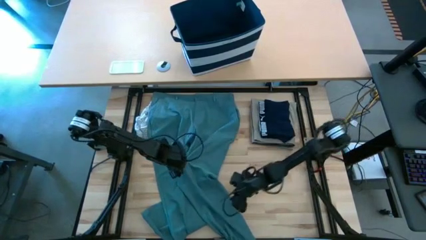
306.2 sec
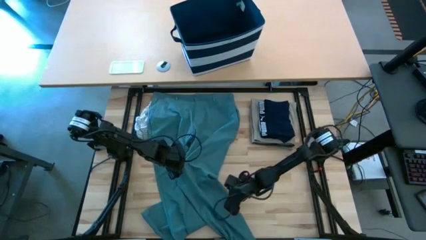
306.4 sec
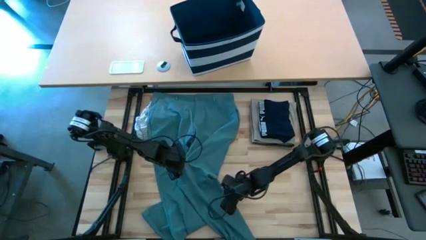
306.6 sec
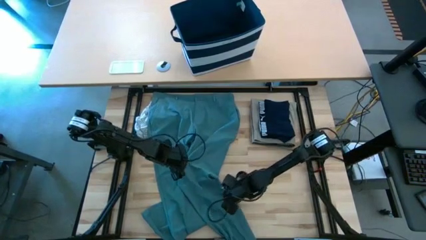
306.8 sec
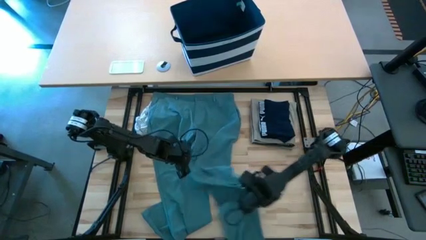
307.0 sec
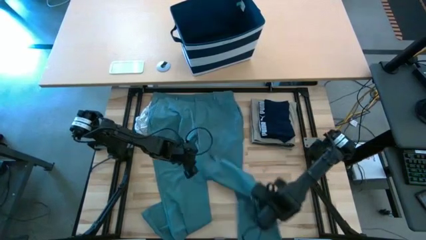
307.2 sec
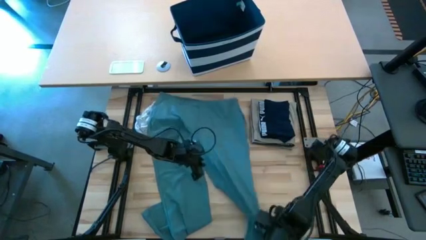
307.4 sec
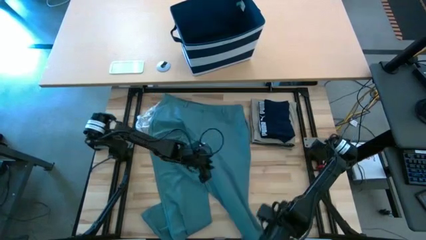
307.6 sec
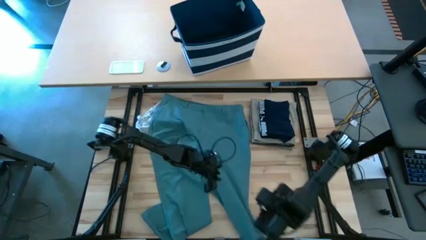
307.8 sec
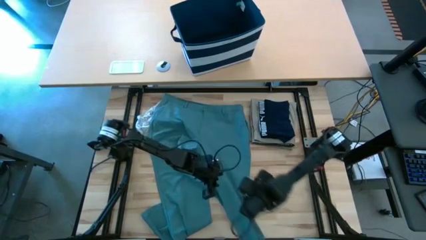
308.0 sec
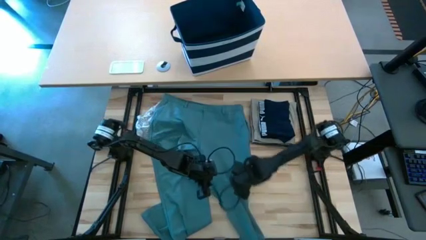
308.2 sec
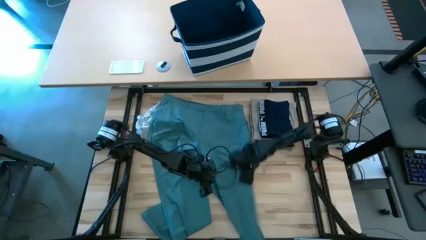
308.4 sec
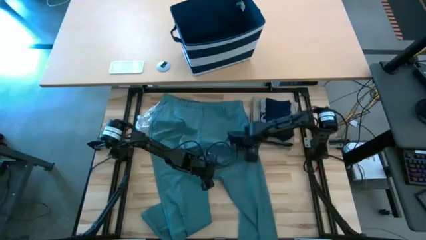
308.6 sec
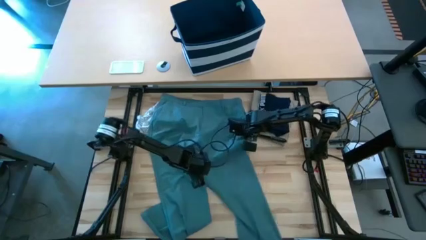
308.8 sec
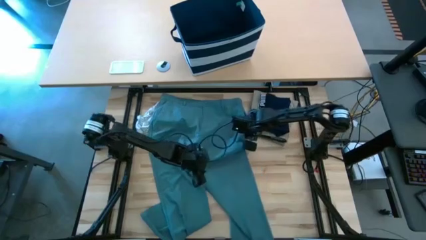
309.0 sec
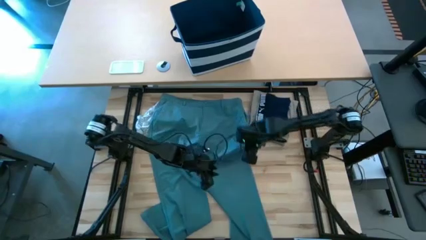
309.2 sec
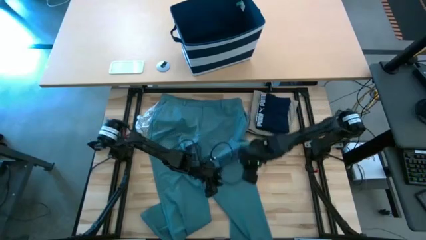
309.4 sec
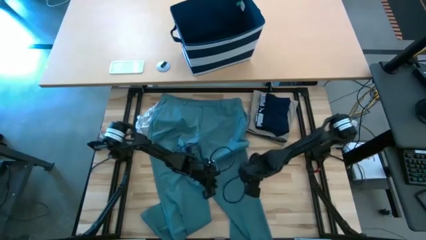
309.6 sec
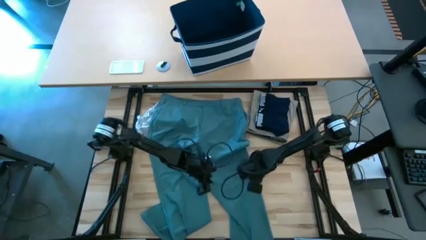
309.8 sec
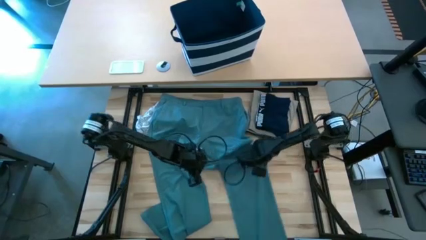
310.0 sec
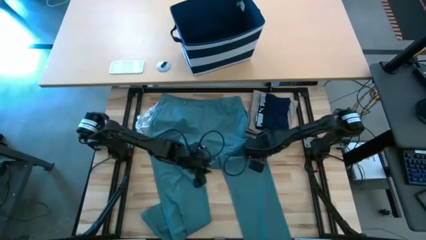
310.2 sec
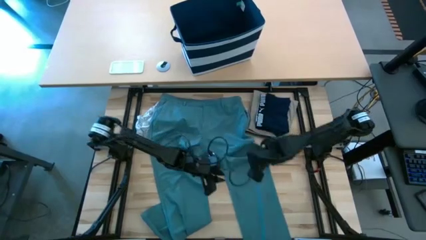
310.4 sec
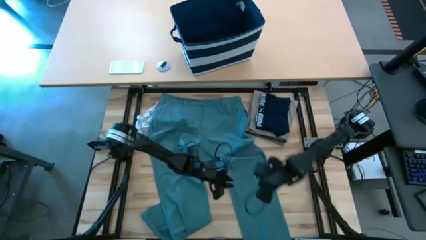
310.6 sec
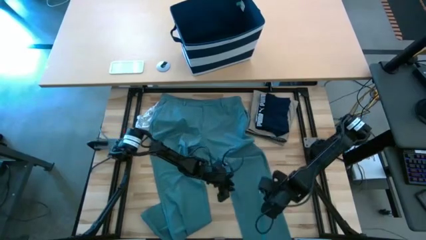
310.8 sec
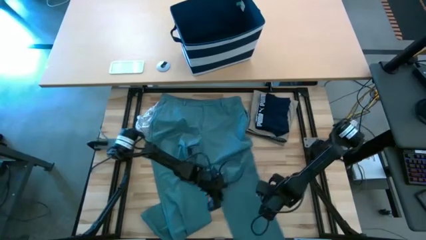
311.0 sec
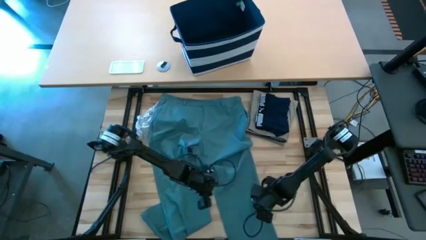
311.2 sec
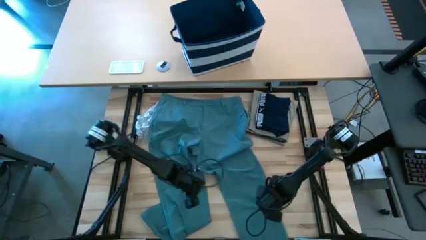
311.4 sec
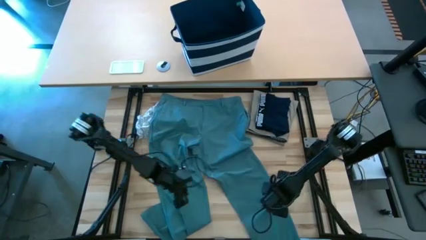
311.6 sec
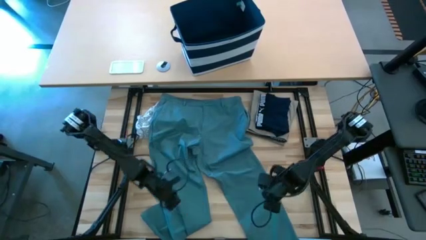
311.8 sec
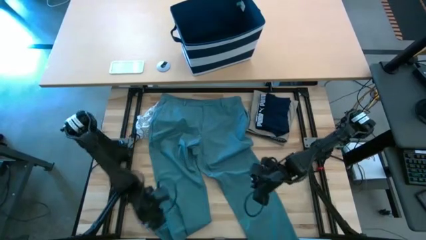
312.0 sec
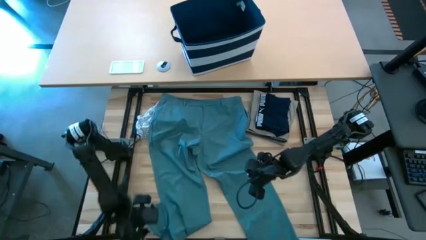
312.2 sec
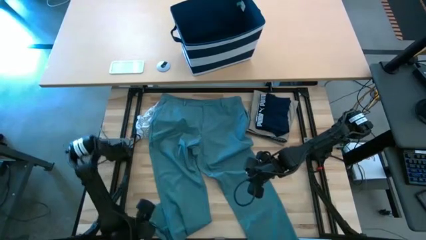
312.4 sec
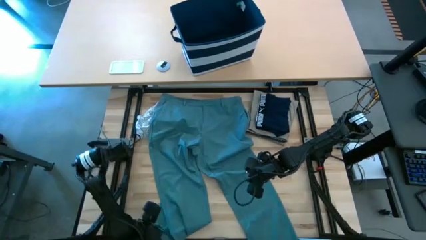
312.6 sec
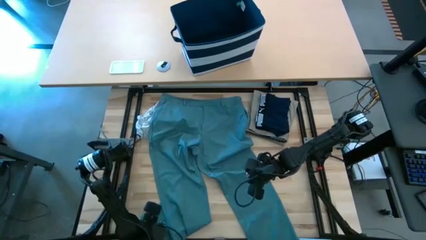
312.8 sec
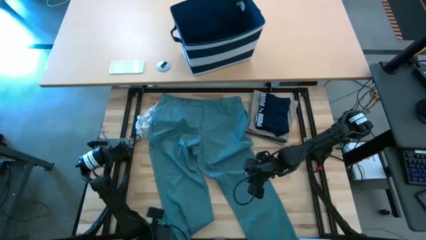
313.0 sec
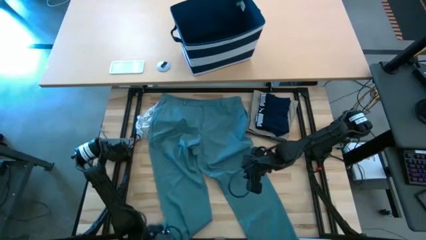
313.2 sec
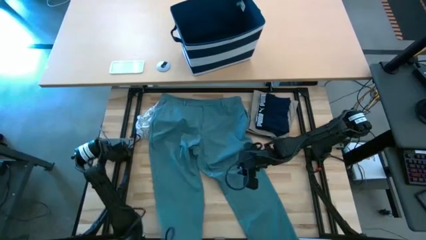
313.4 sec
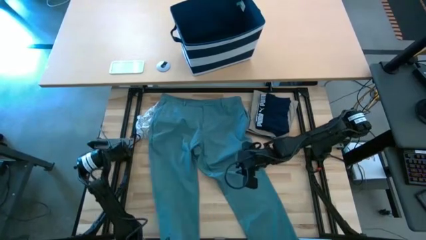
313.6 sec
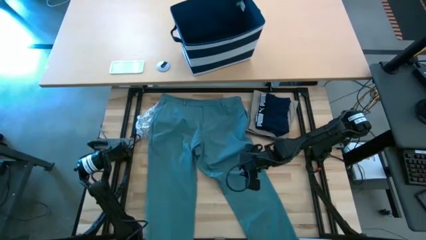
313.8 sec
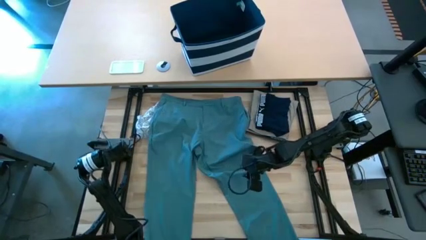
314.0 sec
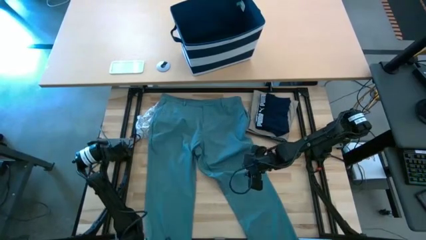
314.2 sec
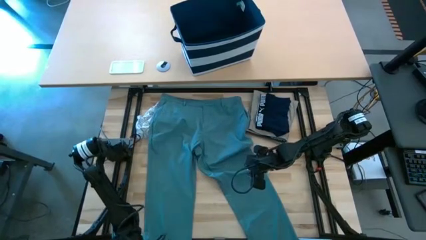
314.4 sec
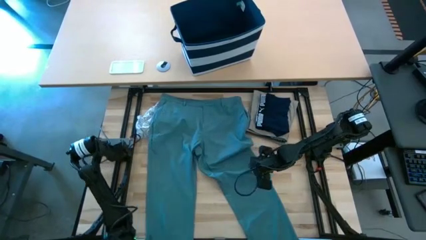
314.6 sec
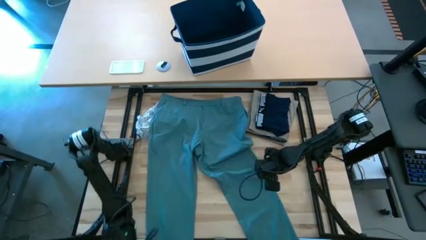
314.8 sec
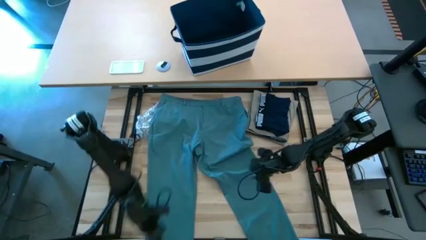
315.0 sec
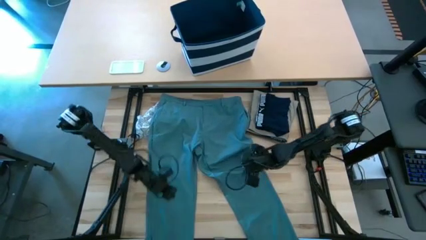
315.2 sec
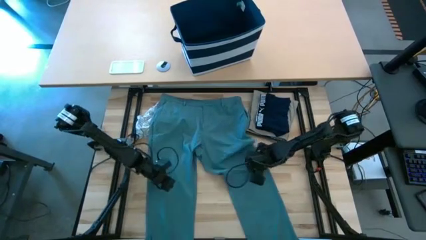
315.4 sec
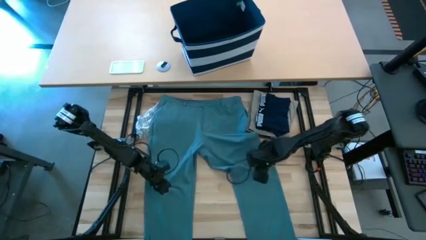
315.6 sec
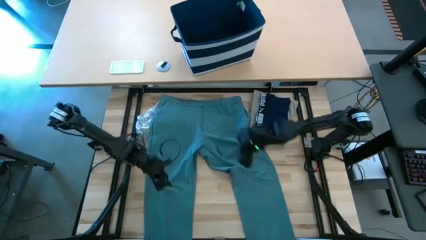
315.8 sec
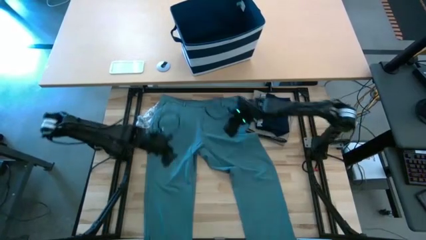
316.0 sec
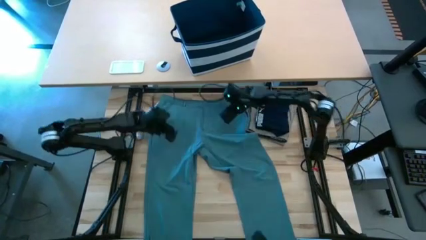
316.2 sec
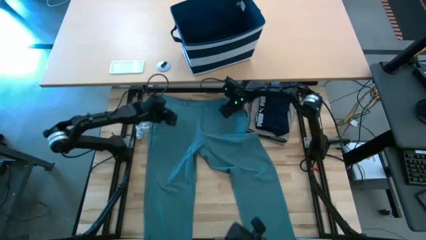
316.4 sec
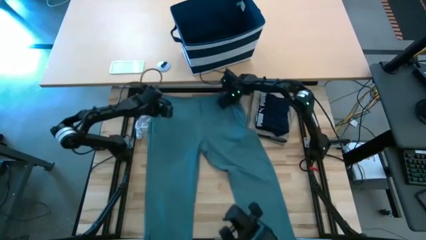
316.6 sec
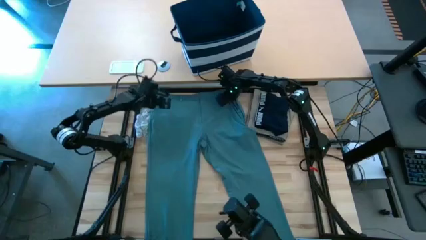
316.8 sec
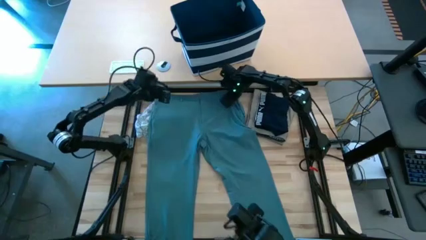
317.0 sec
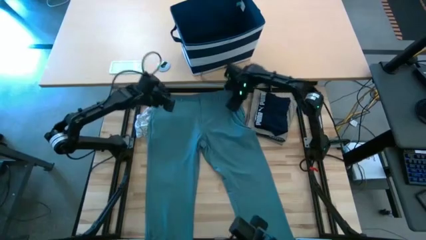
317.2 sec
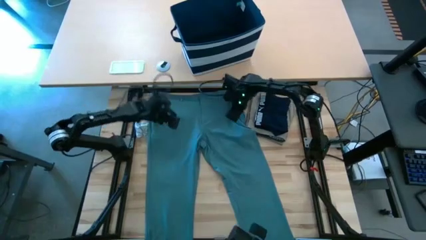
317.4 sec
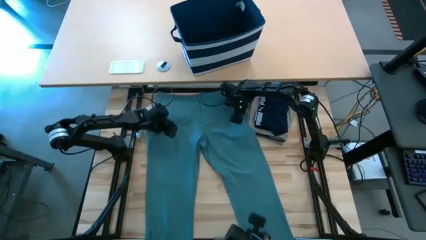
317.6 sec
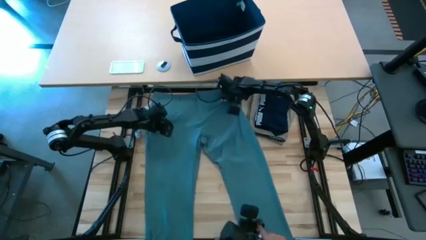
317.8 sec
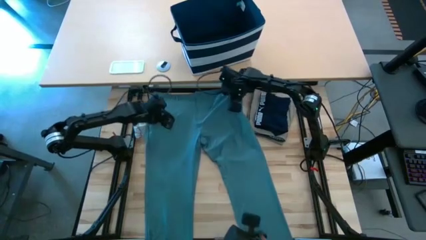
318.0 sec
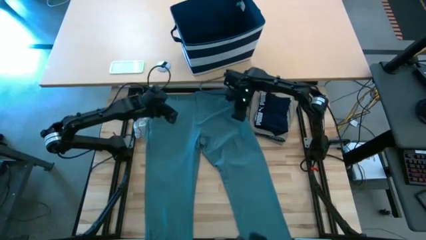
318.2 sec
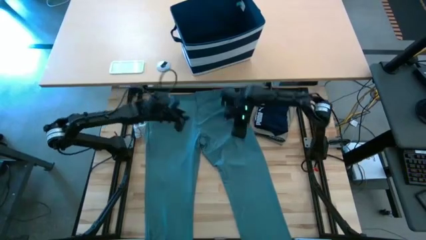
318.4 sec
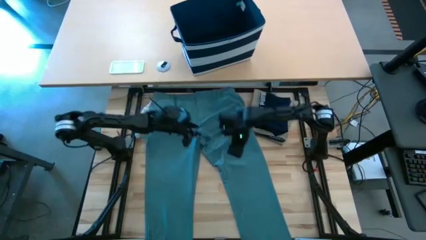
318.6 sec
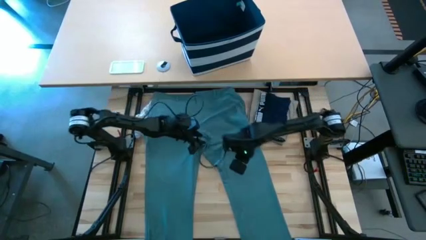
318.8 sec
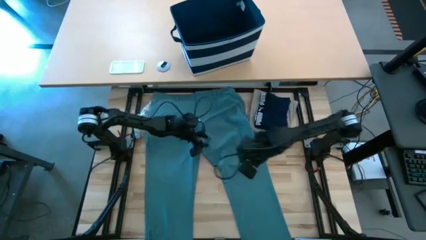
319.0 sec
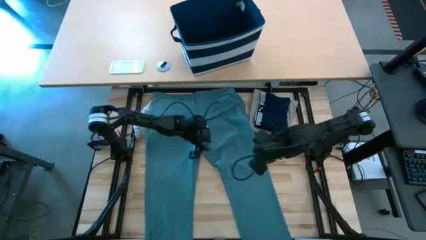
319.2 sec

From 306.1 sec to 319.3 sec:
Task: Fold Laundry from Bin
Fold the blue pants

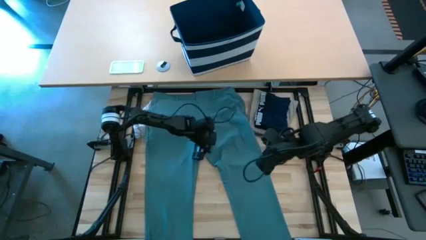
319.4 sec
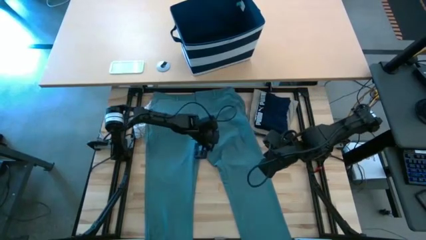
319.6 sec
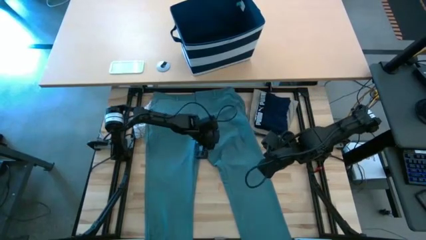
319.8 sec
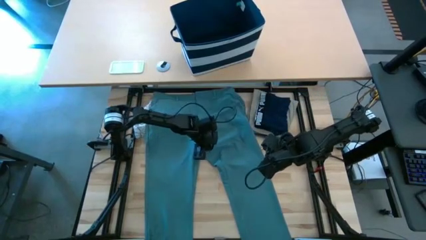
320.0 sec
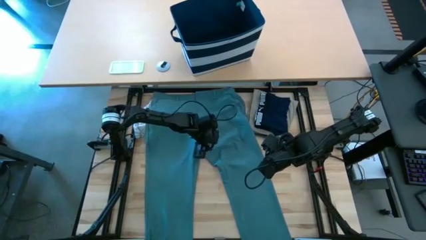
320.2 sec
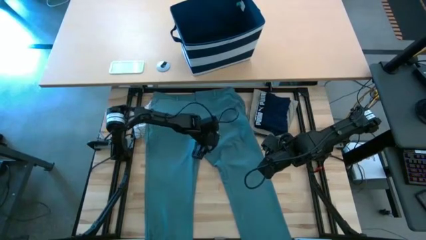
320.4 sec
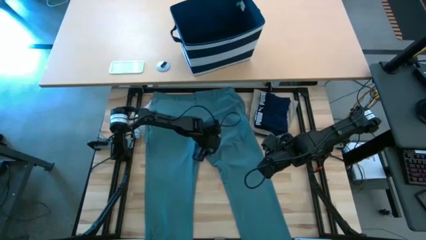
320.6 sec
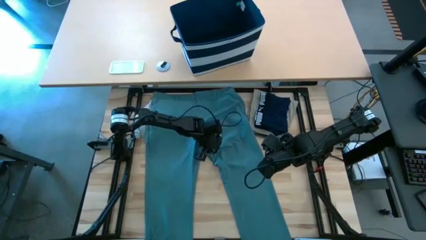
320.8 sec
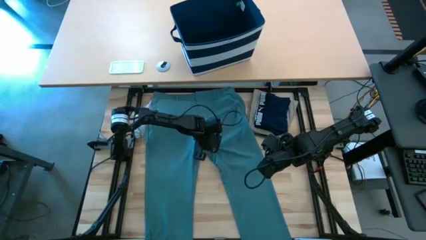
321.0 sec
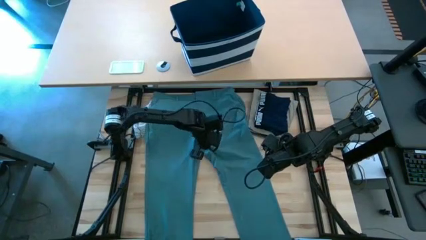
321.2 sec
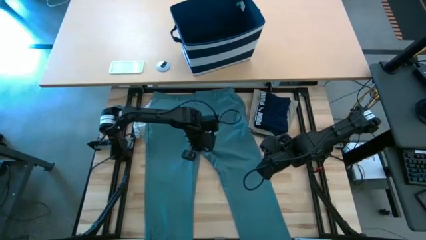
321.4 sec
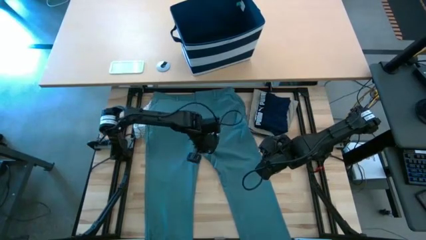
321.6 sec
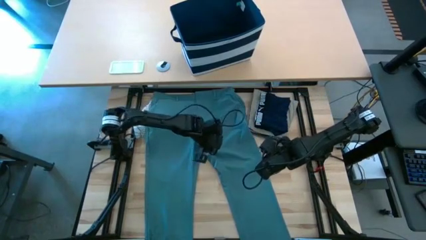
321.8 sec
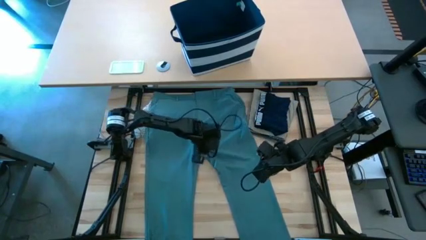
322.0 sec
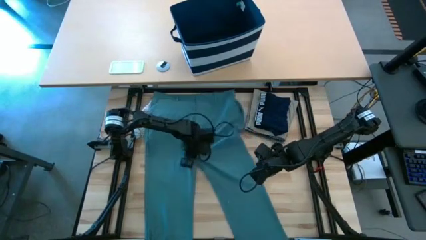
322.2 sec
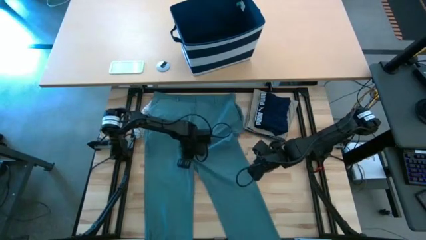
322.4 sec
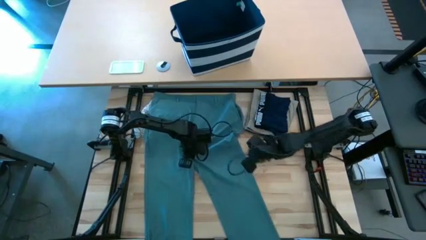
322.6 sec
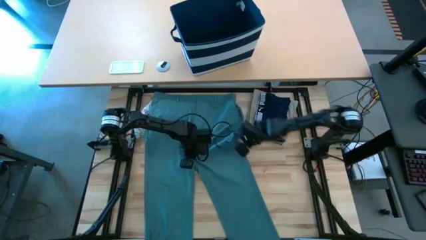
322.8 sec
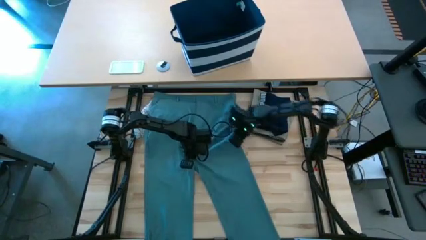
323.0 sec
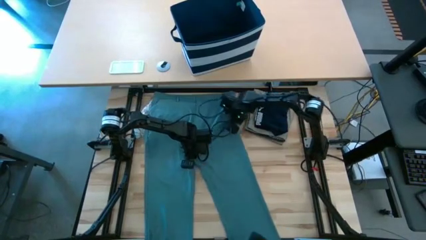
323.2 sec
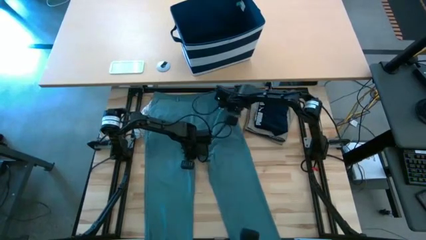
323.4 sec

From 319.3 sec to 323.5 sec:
Fold the blue pants
